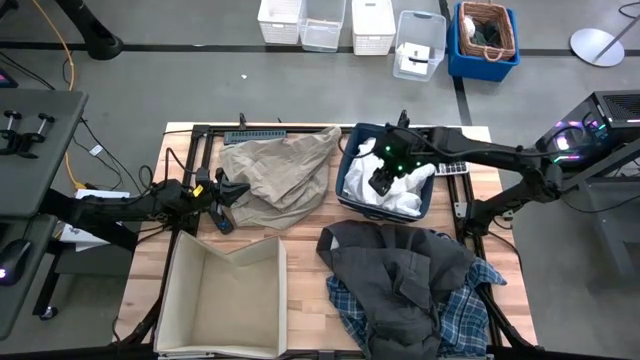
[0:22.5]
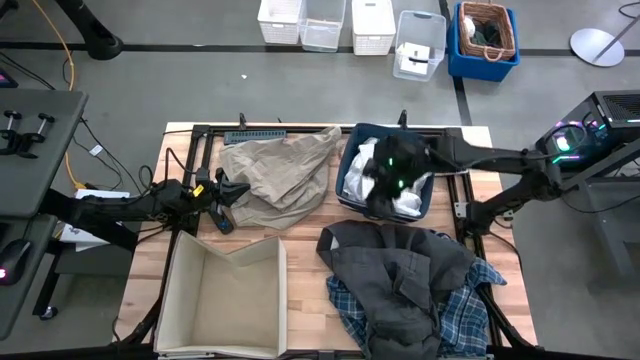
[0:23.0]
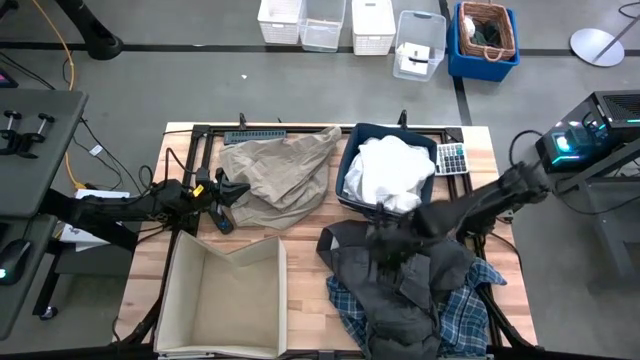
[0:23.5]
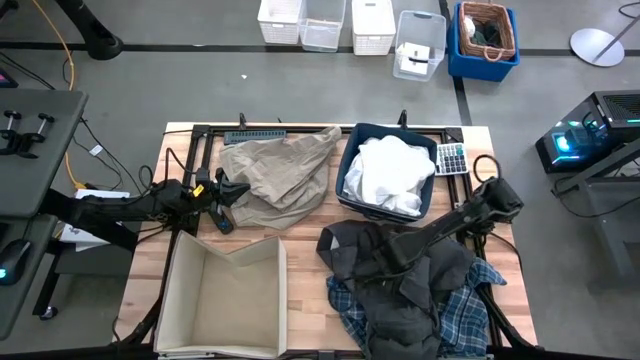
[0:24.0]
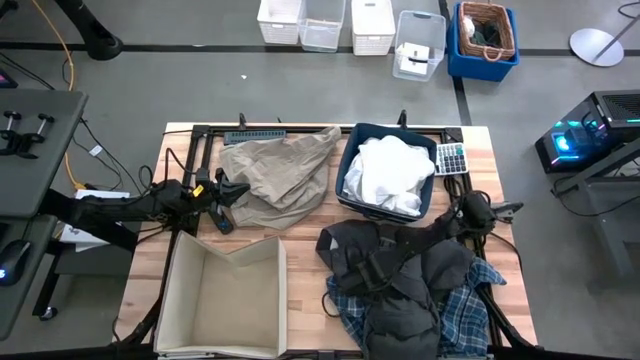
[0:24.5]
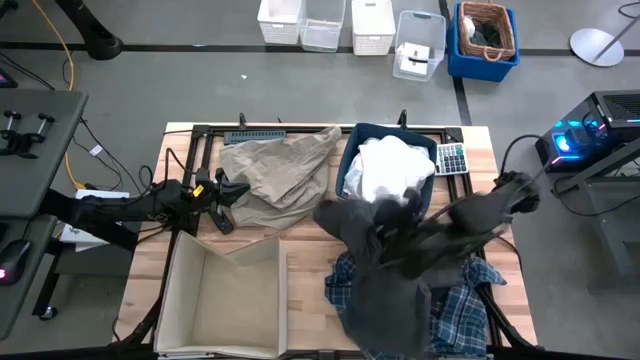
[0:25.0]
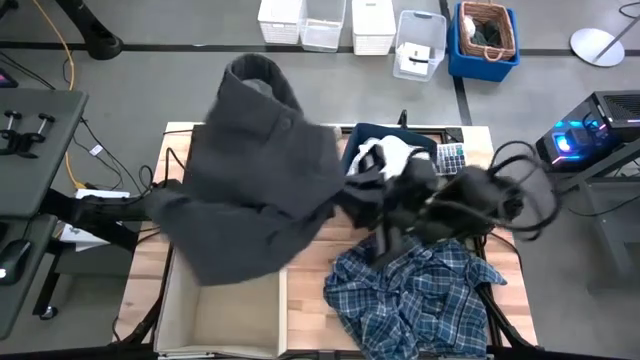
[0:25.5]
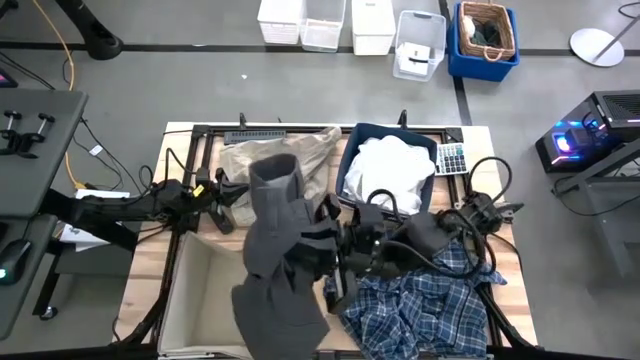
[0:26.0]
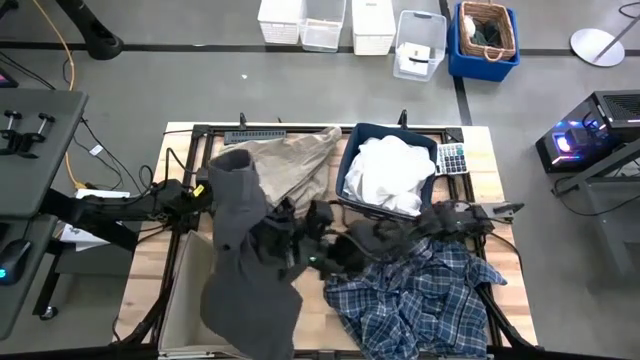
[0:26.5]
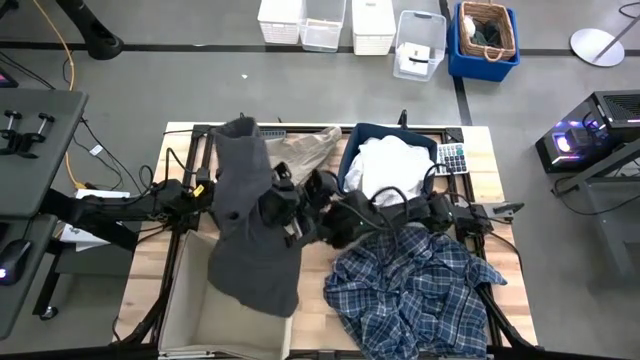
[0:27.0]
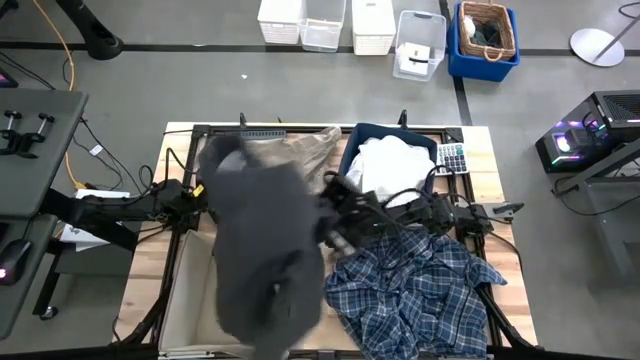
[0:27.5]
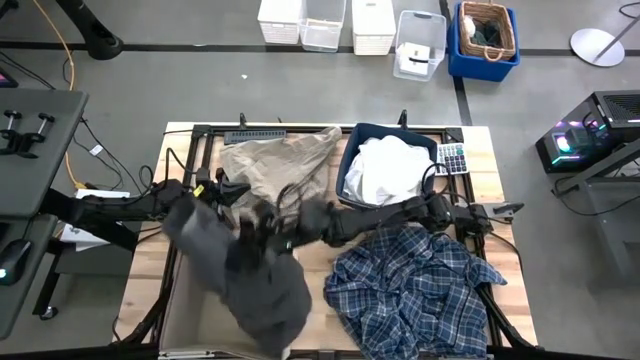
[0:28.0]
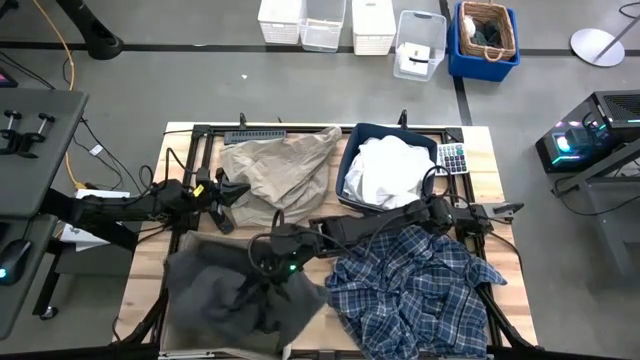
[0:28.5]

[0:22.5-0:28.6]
Task: Sort clothes
Put the gray shorts into the white laundry bin

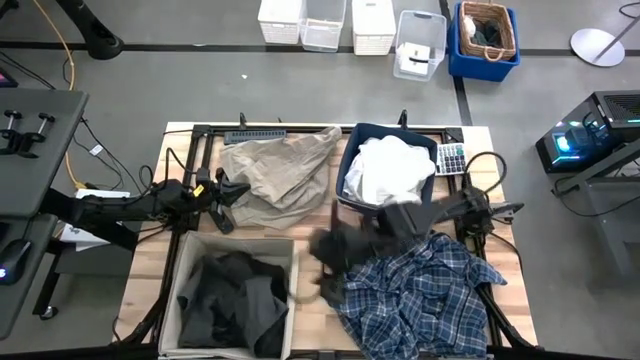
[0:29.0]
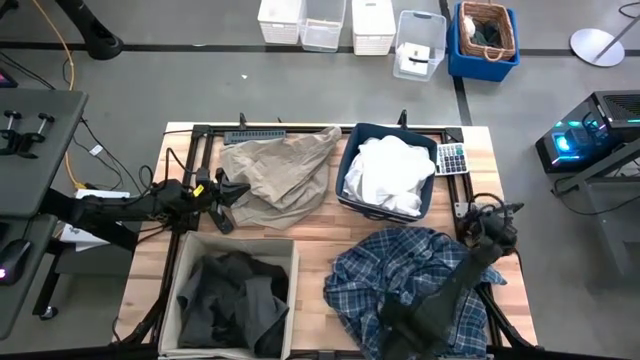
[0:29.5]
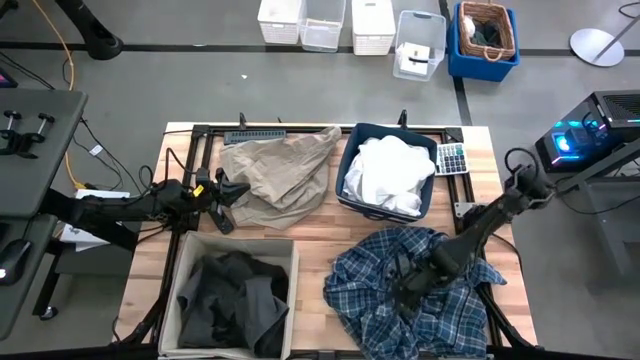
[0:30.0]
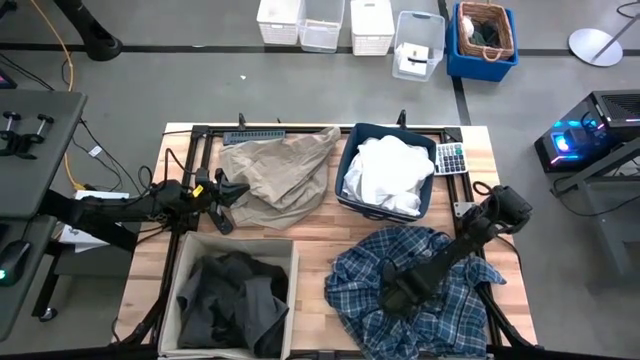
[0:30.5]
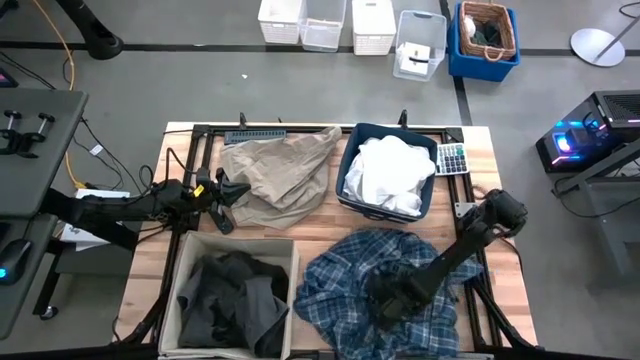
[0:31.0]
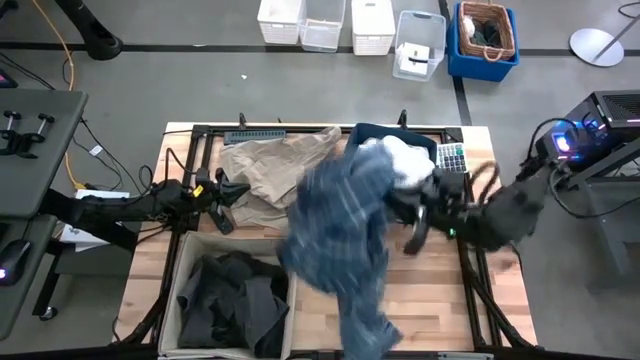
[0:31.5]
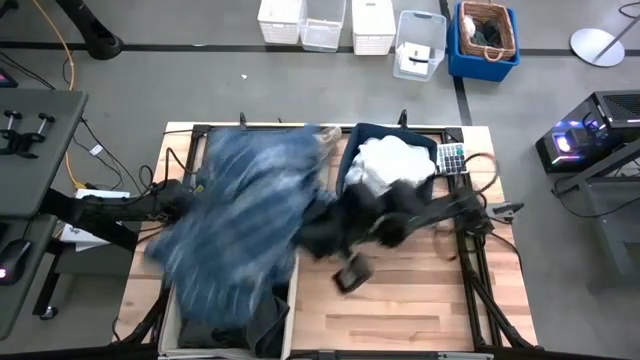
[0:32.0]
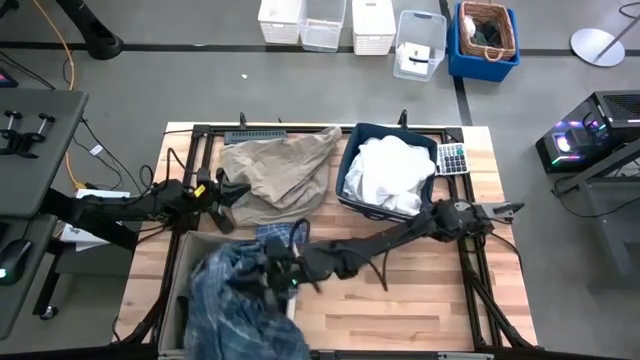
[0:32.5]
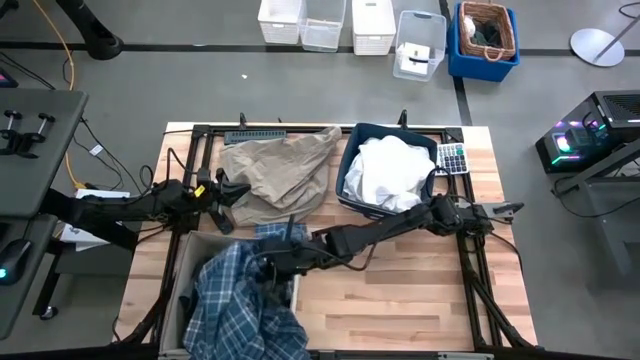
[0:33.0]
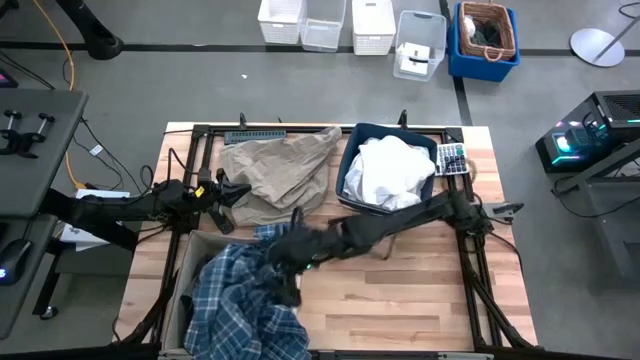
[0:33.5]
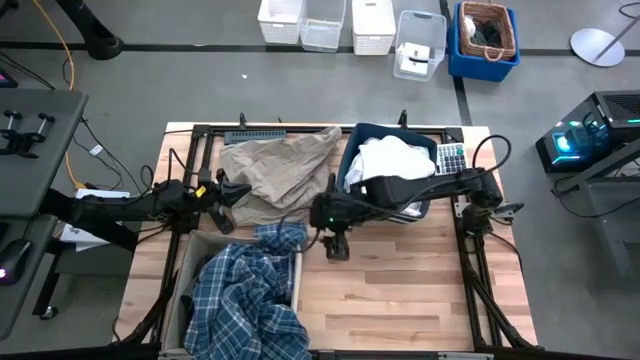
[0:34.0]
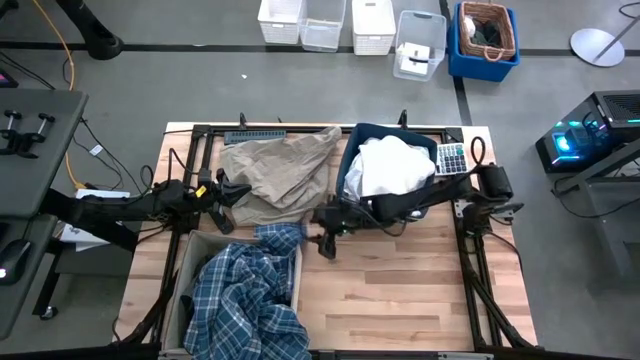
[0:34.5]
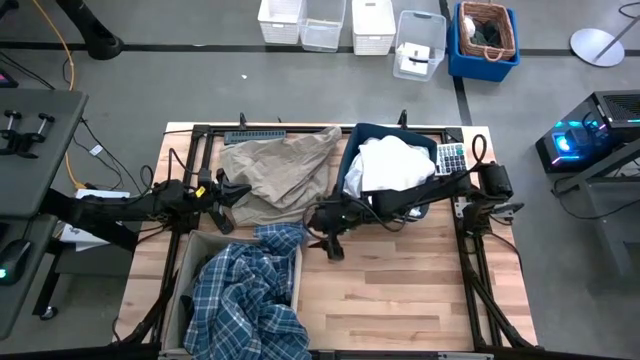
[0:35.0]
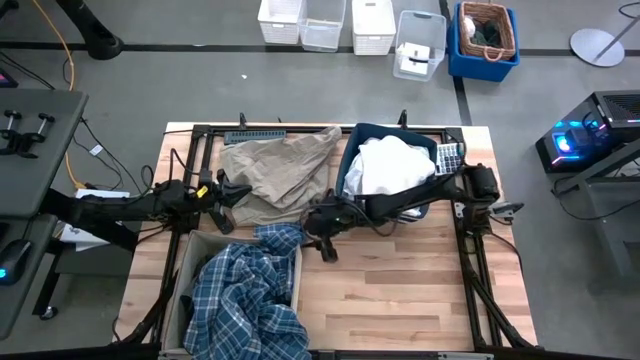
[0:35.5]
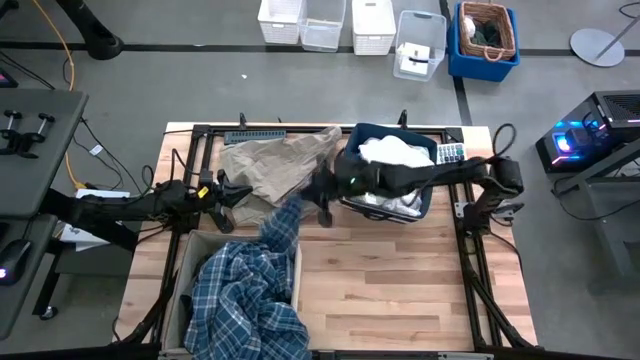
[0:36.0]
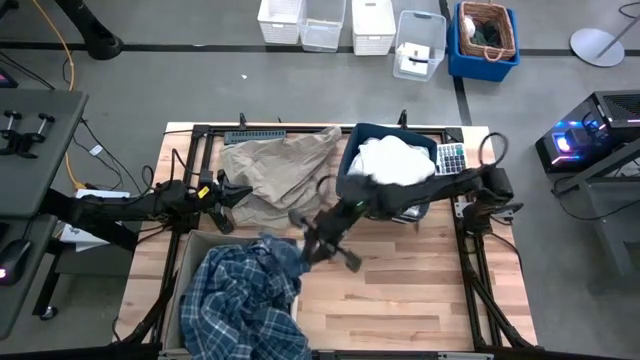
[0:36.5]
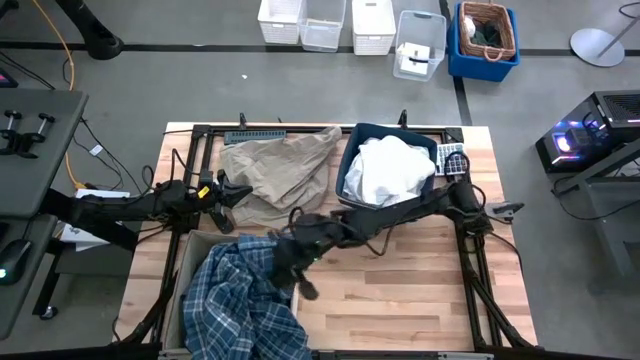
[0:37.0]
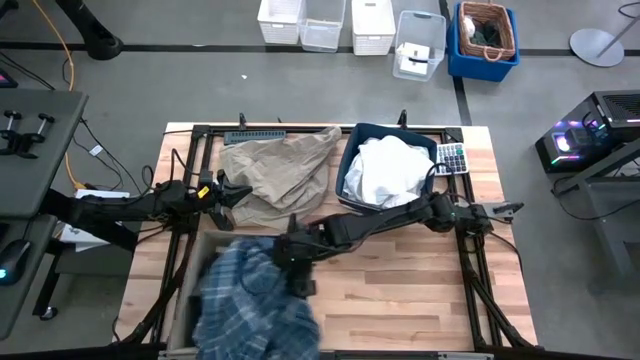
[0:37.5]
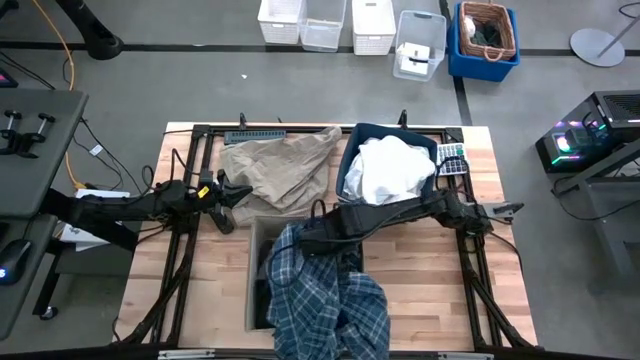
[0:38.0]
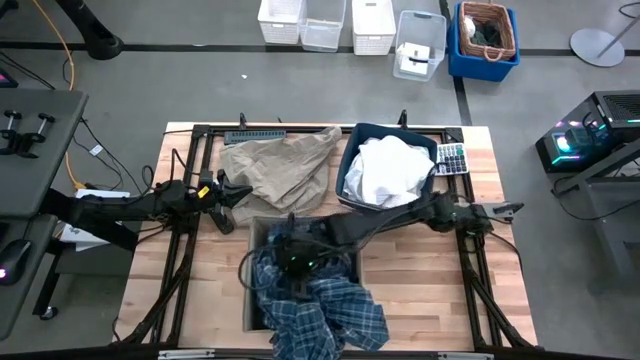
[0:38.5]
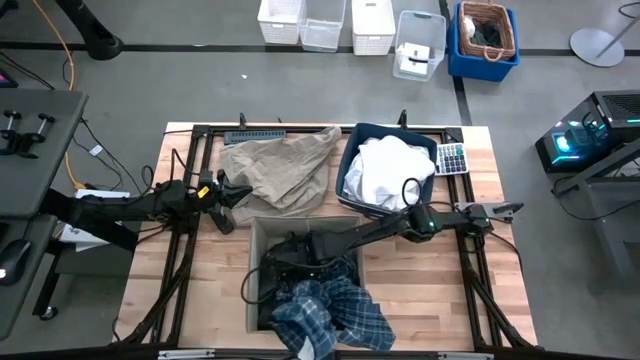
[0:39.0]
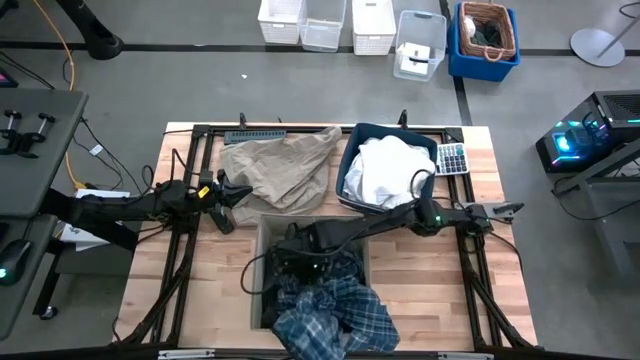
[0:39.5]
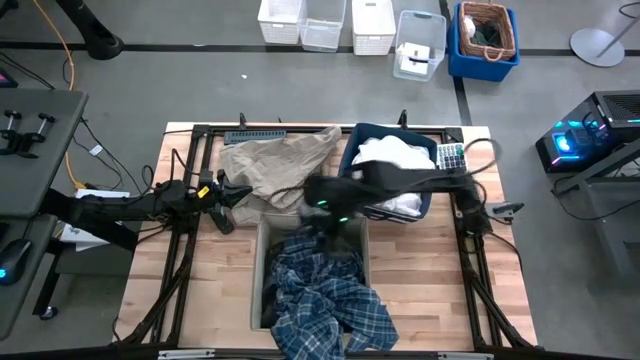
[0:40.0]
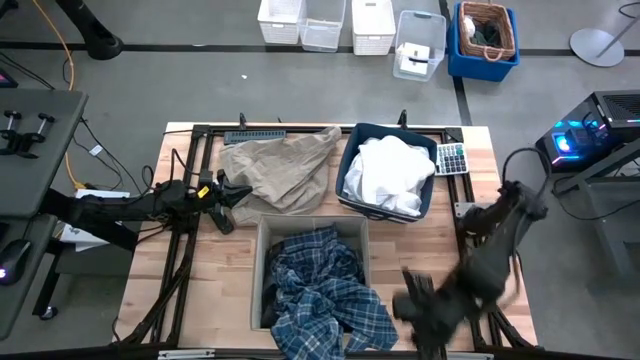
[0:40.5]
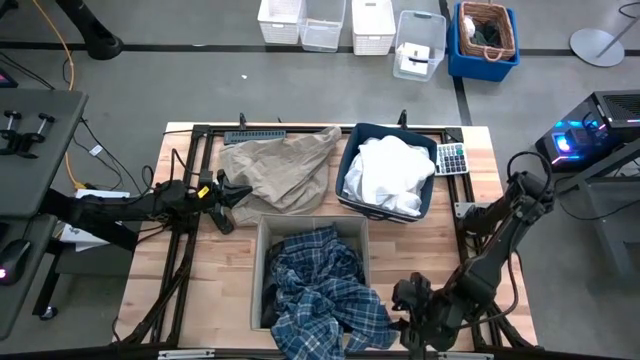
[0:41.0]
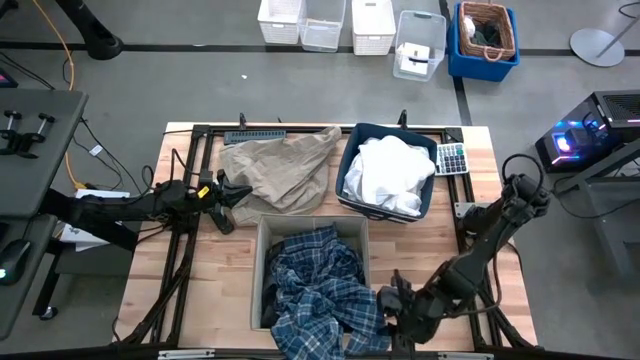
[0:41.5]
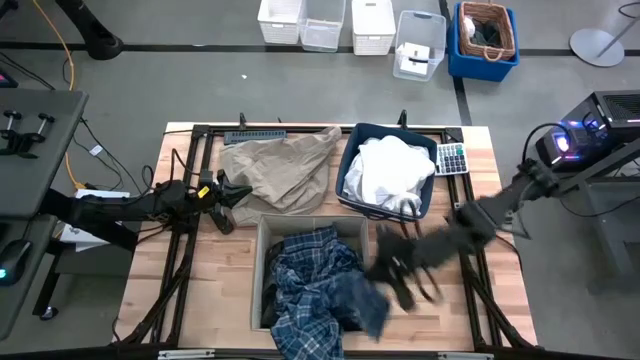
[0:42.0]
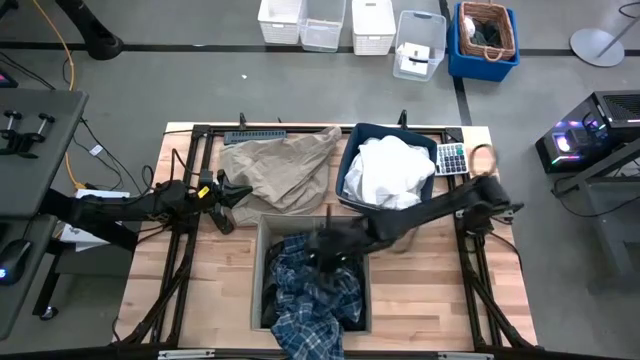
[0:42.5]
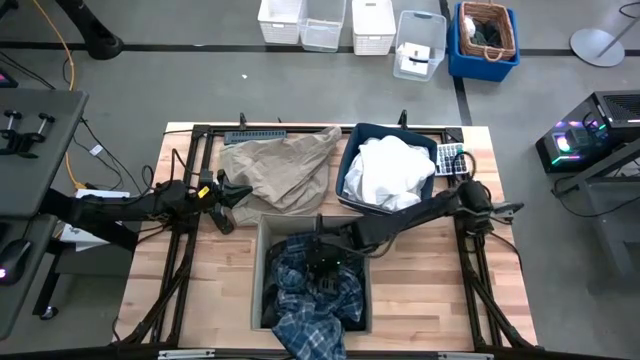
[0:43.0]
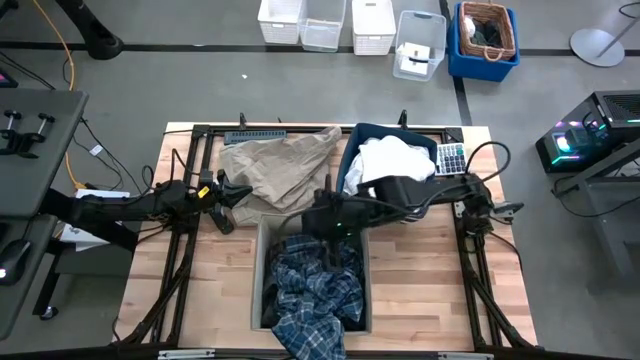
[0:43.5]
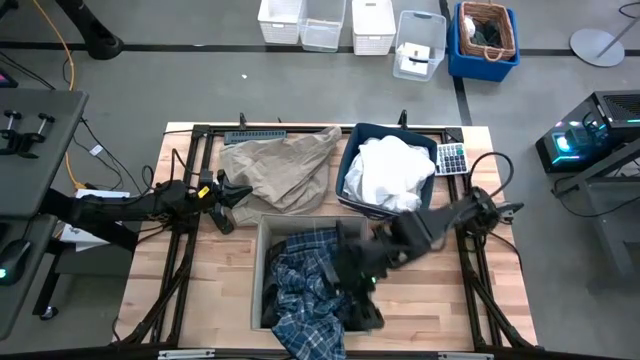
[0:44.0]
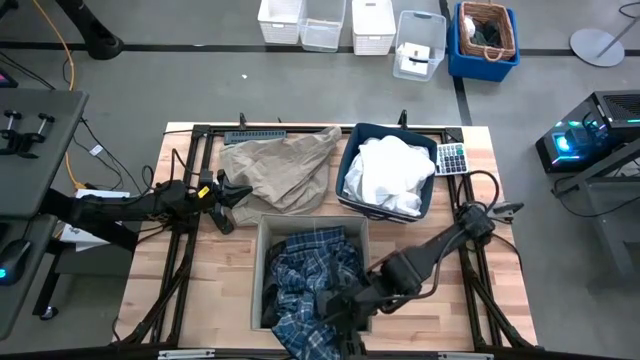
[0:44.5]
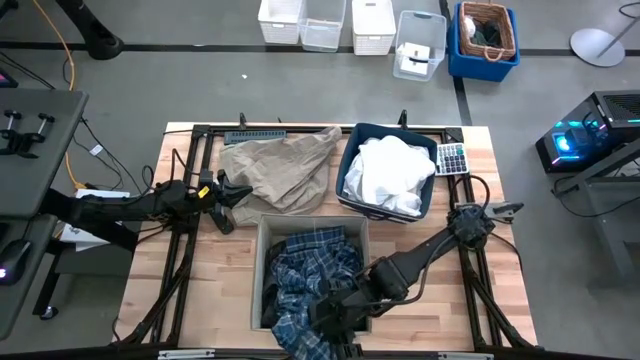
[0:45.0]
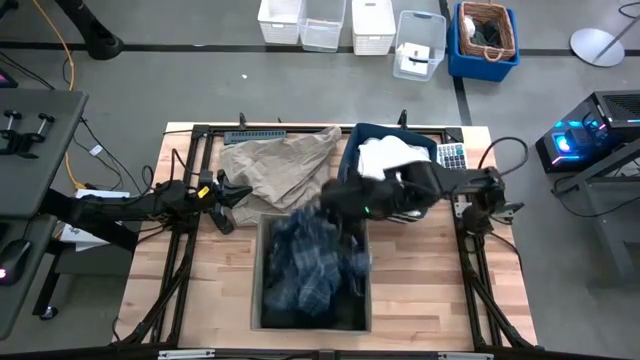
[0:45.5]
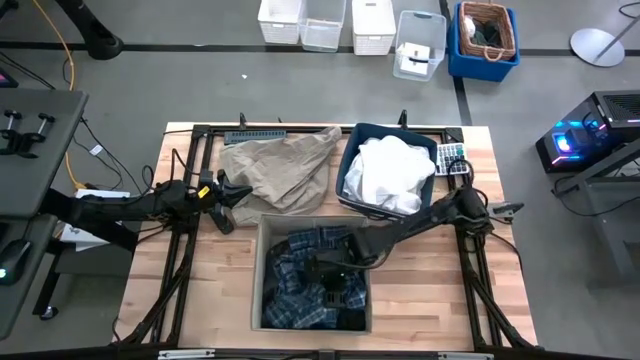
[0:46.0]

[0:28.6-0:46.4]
Put the blue checkered polo shirt into the white laundry bin
